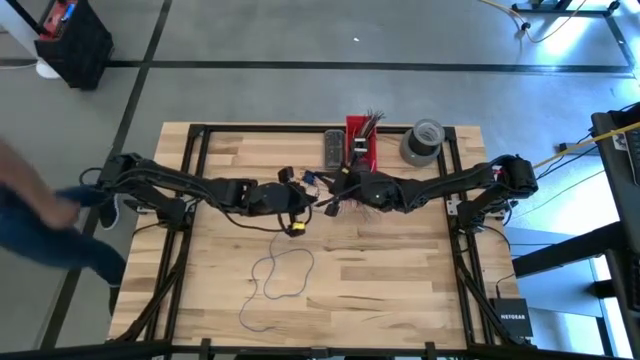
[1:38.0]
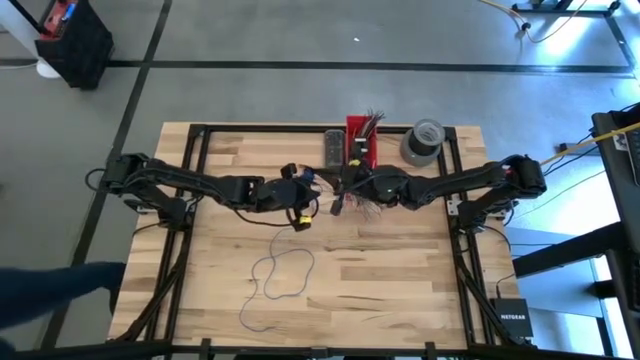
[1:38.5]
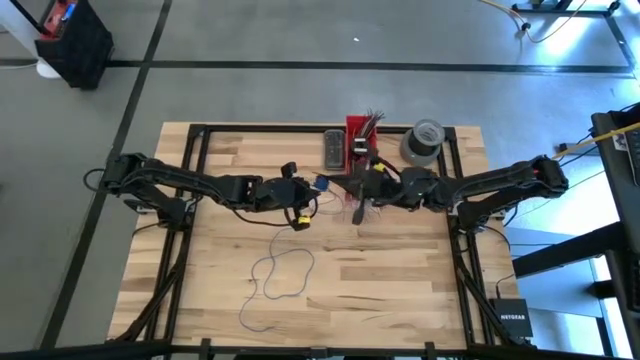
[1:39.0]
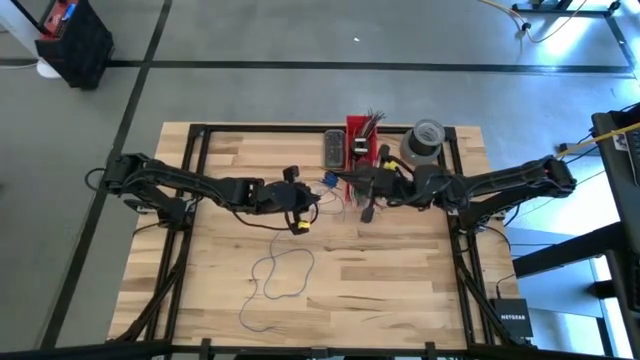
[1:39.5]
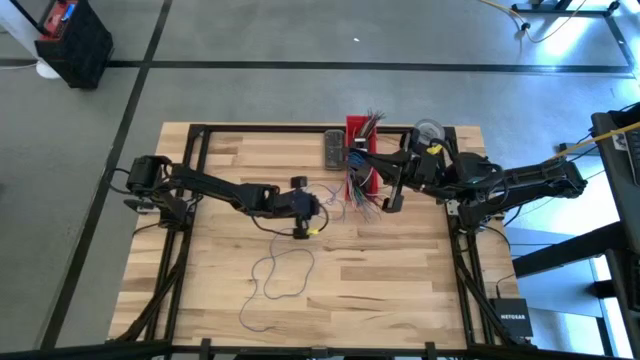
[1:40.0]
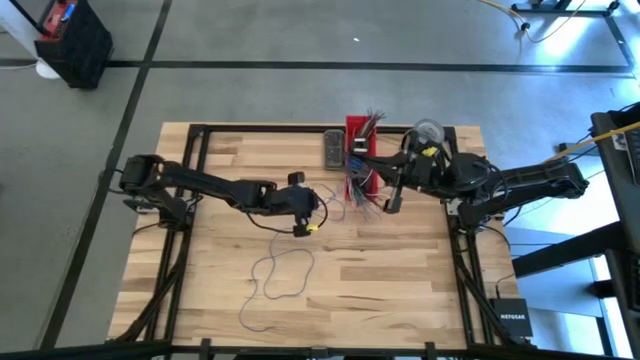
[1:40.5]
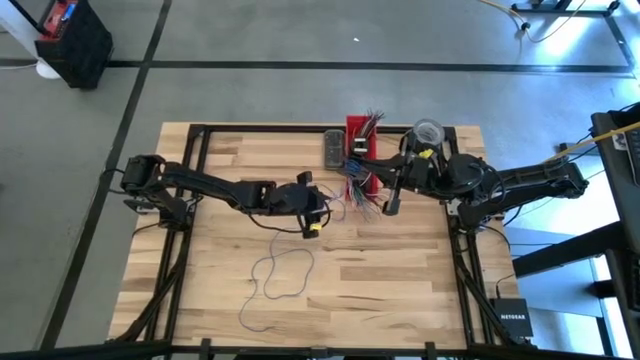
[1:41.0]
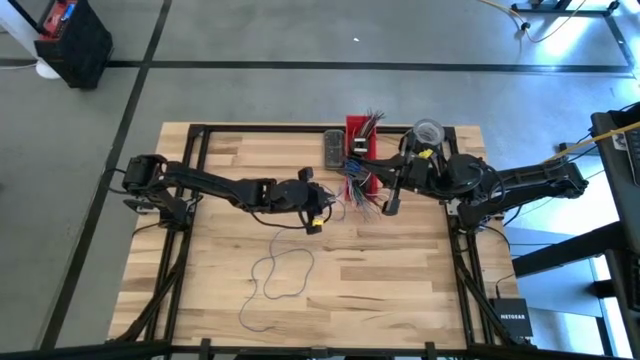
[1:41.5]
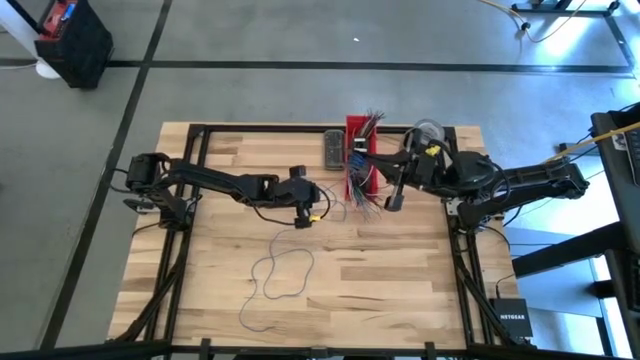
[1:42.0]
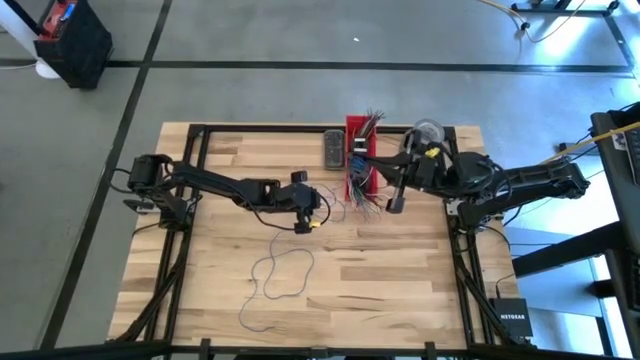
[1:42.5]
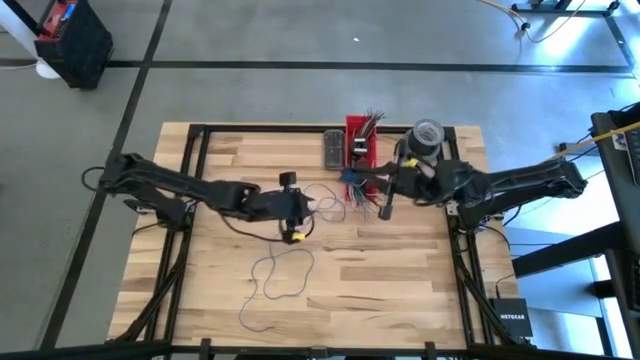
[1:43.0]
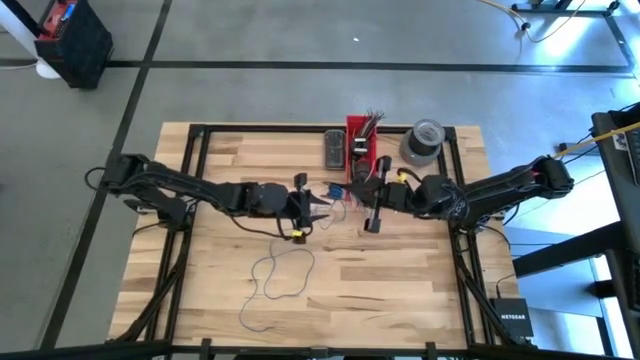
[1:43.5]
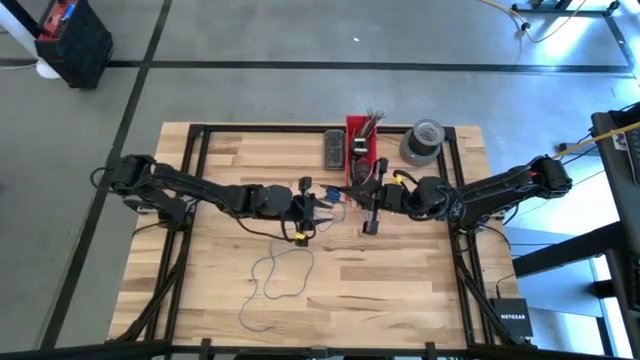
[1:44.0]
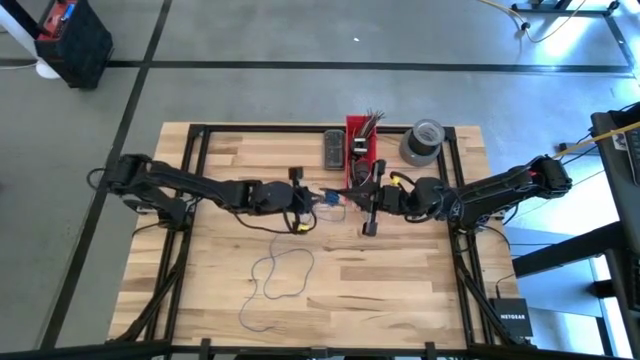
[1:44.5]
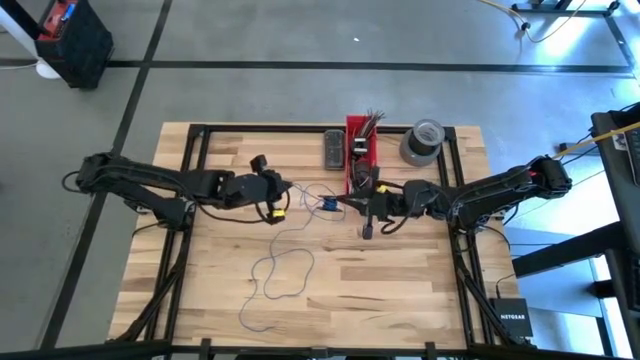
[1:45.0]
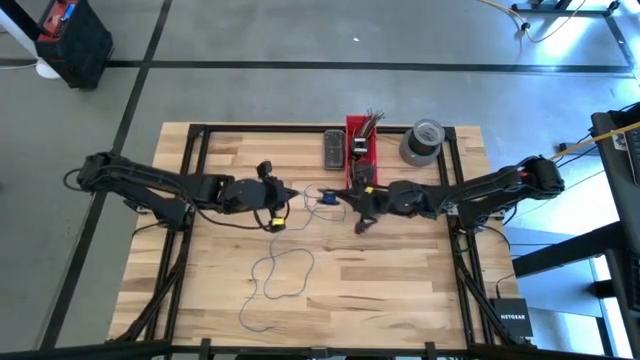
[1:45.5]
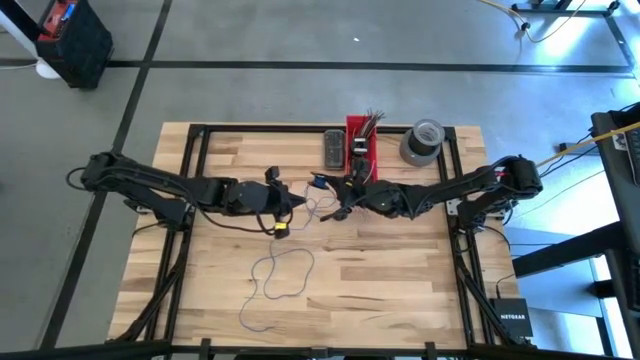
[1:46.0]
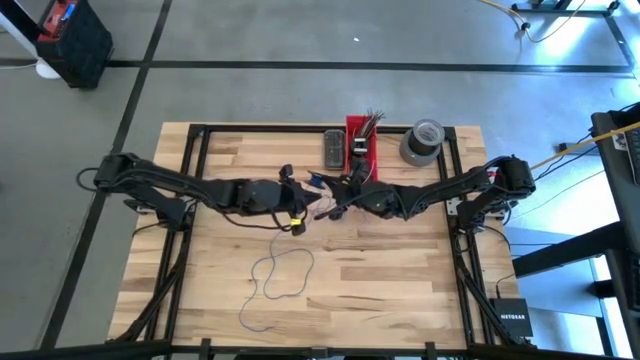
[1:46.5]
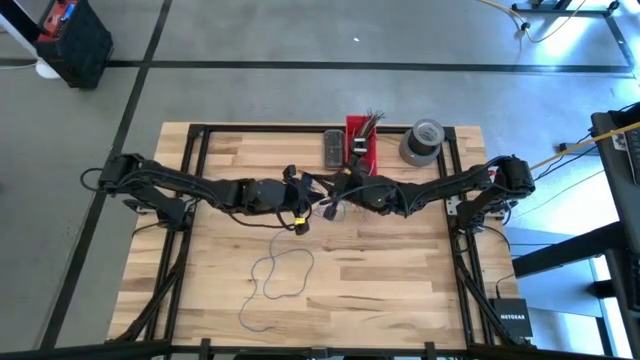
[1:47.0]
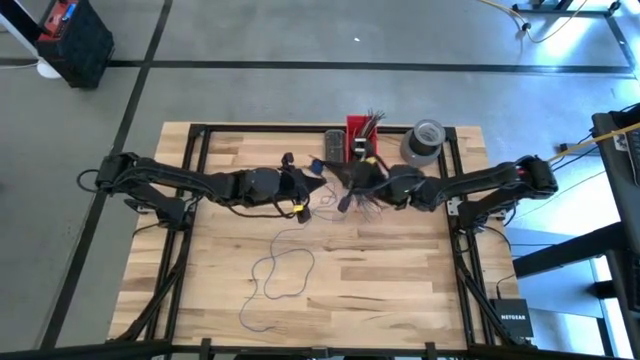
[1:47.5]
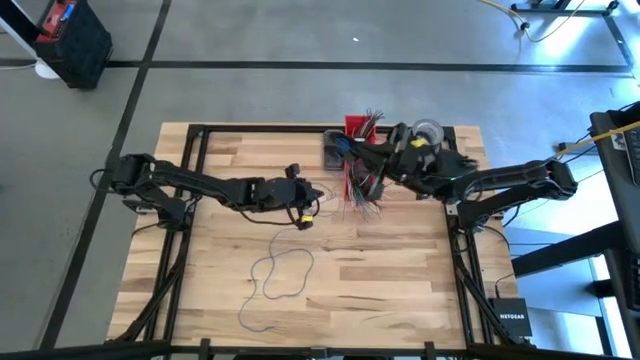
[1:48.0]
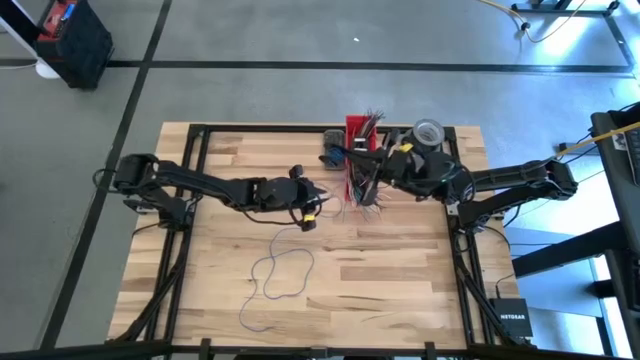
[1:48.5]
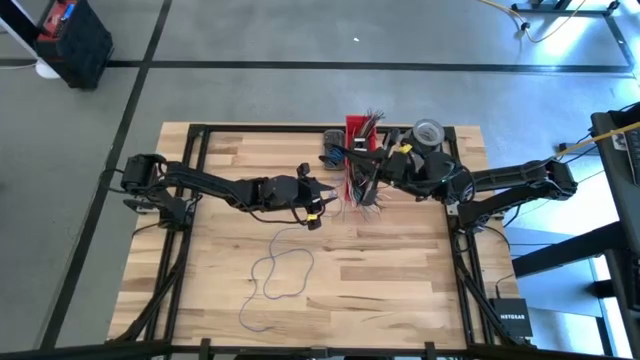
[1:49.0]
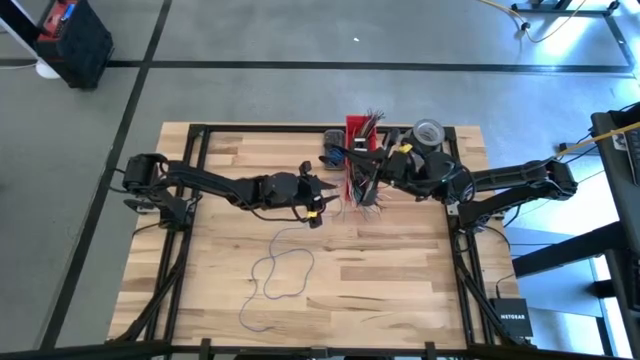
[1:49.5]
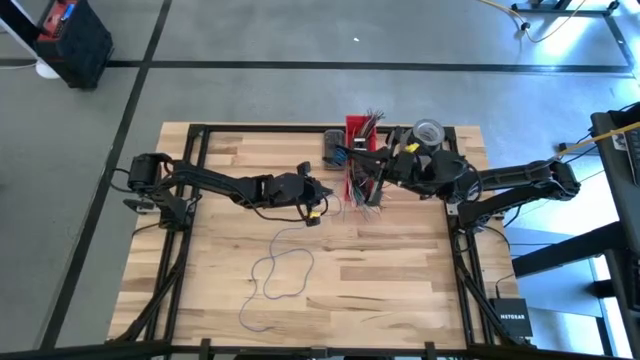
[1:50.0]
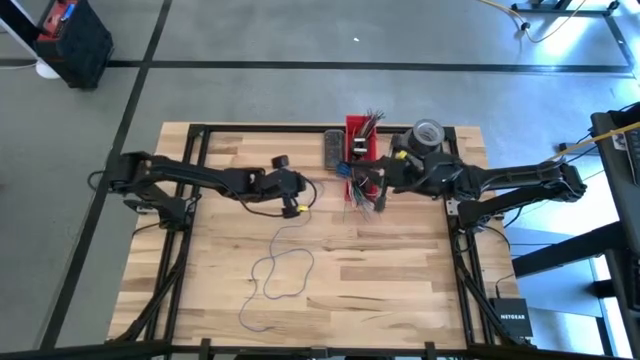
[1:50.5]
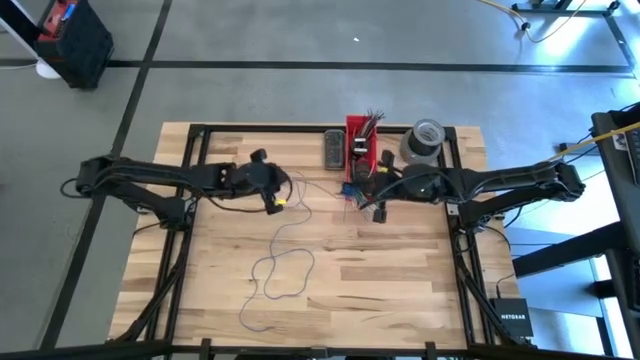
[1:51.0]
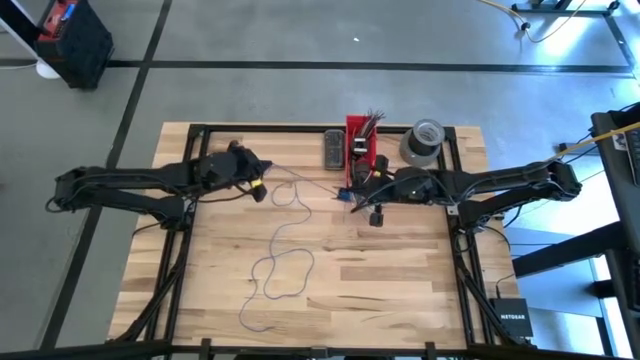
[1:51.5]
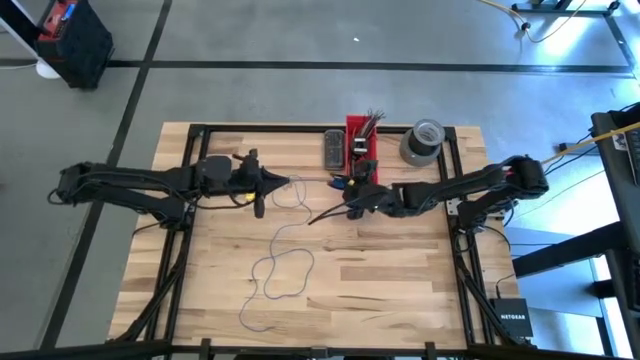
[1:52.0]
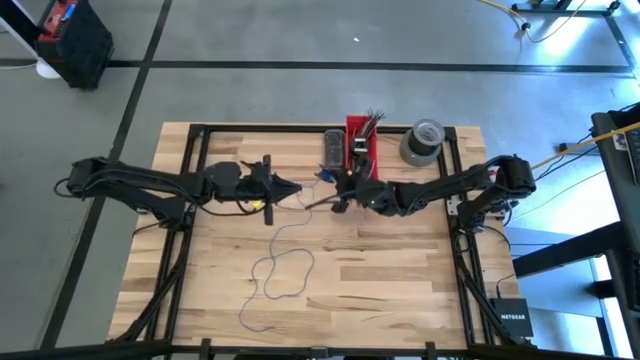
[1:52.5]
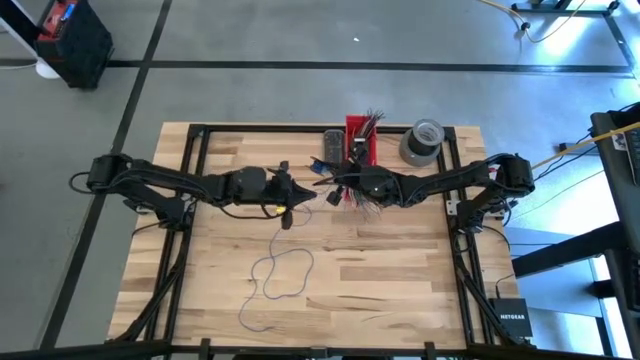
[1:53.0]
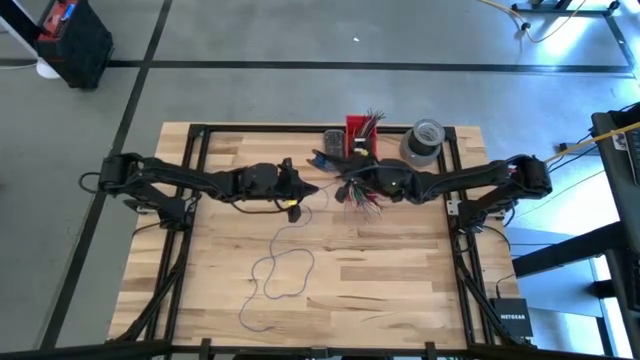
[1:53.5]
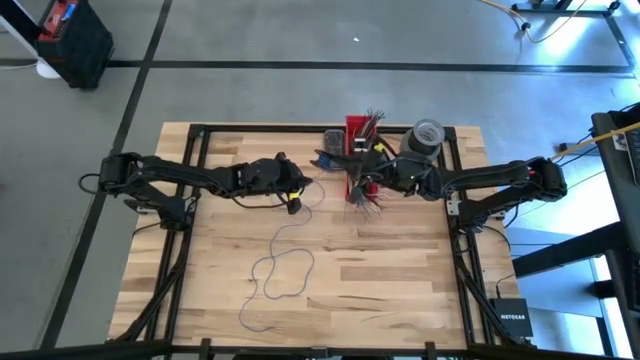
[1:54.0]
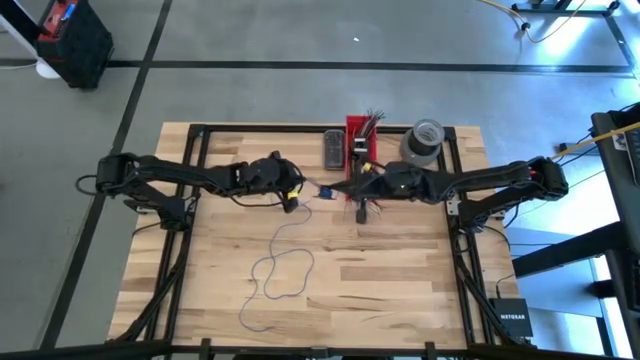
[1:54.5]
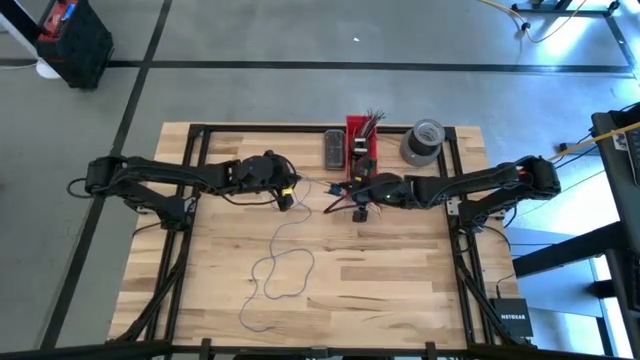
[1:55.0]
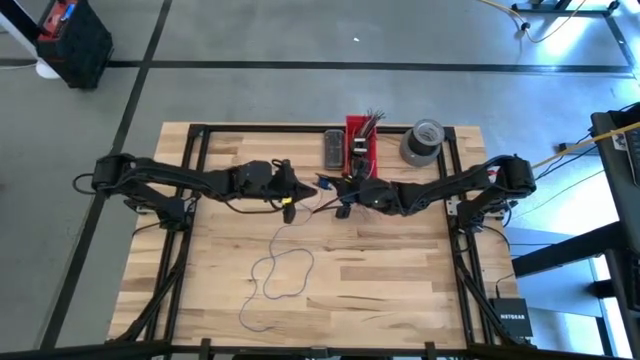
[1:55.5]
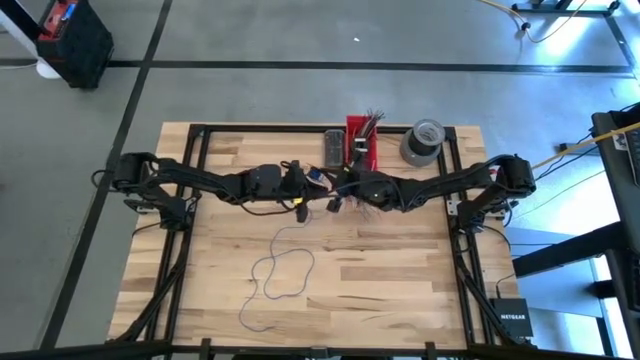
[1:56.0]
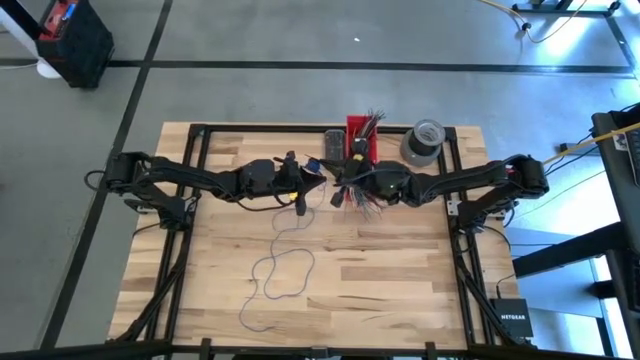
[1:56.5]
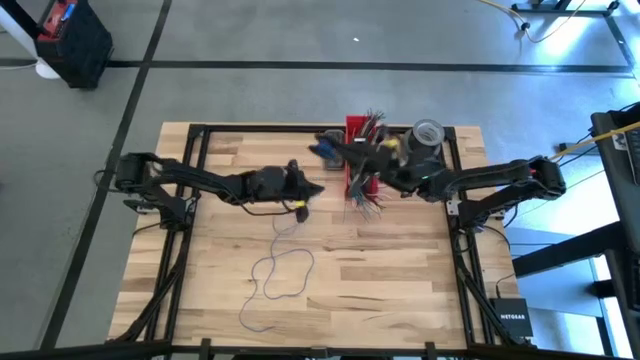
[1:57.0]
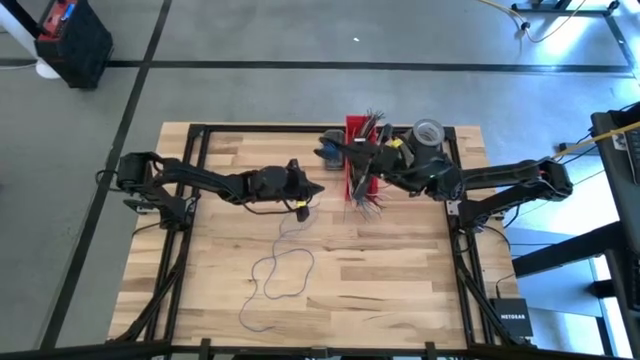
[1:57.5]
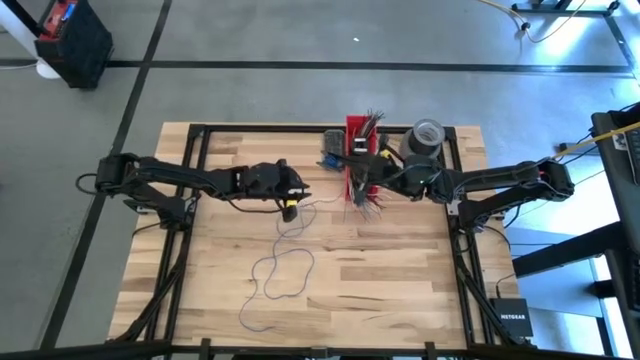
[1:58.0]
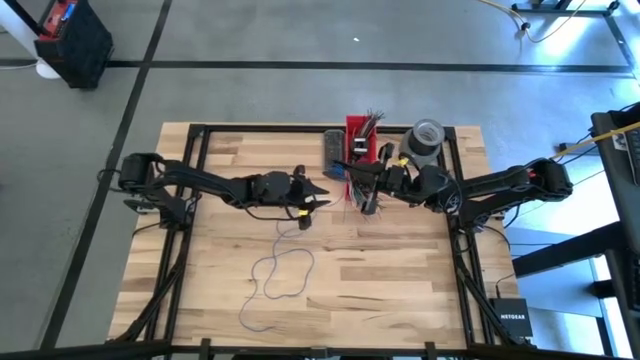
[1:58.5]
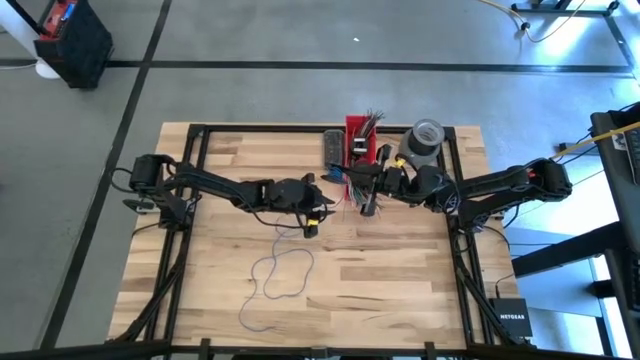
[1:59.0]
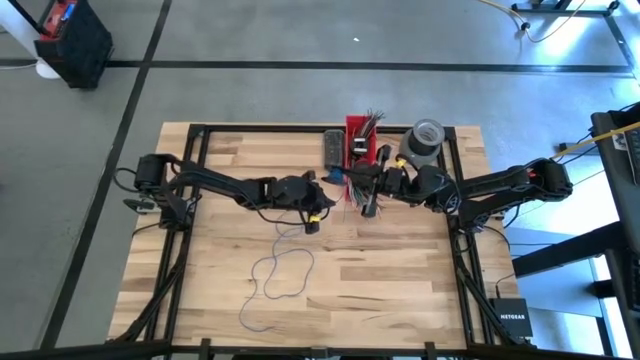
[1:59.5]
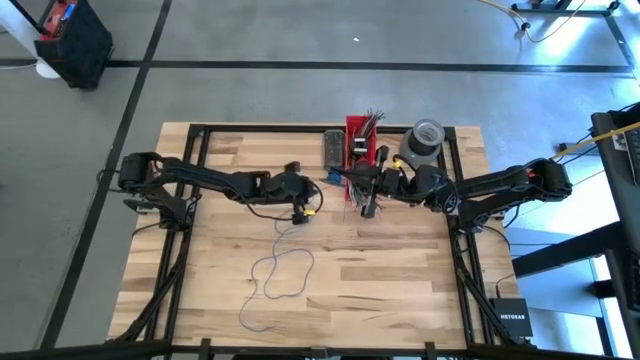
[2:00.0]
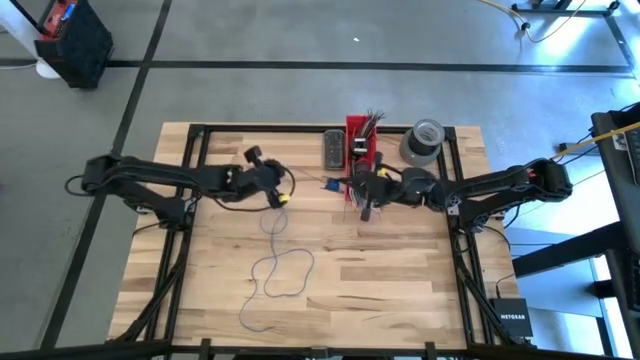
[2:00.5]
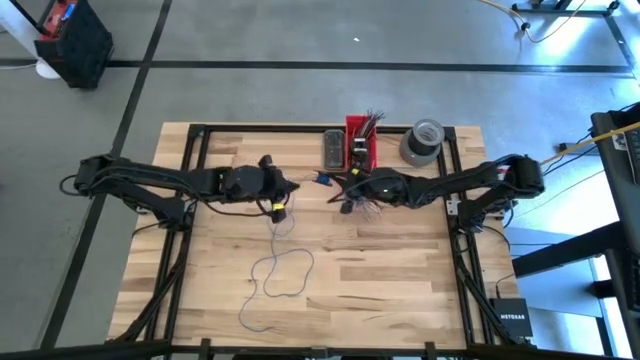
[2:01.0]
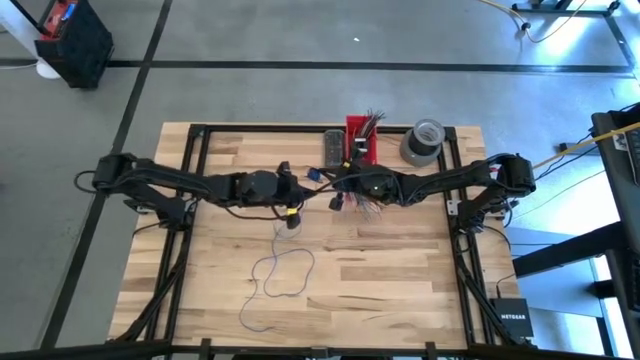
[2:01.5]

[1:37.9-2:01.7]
Task: Coil cords
Coil the blue wire into the black spool
